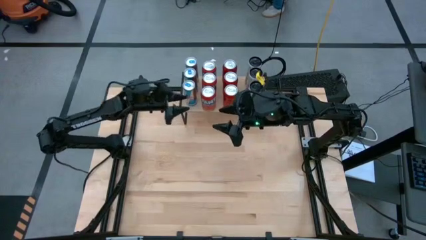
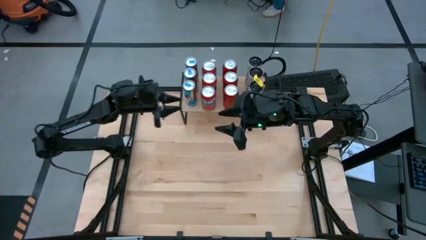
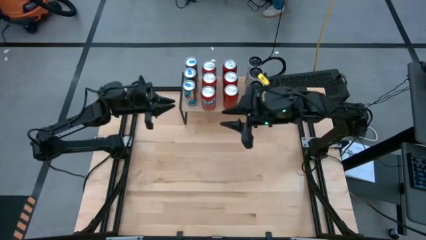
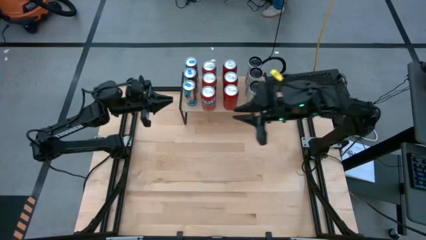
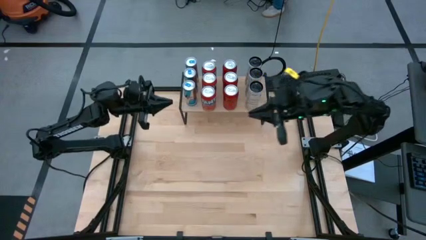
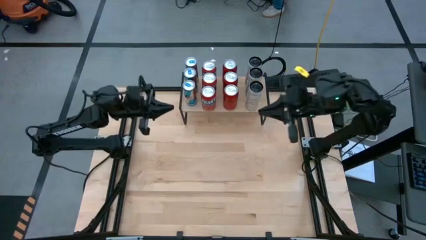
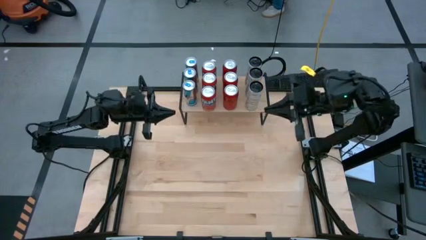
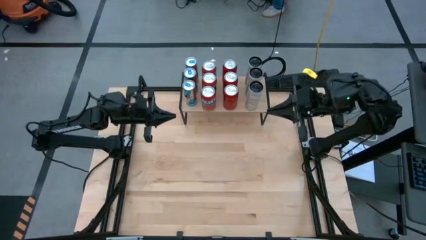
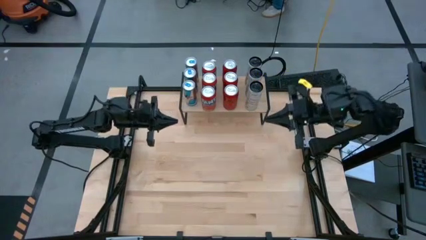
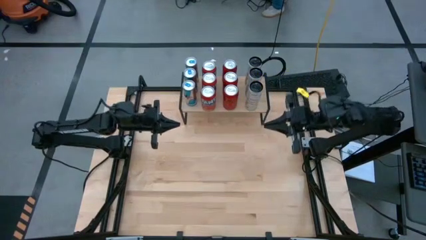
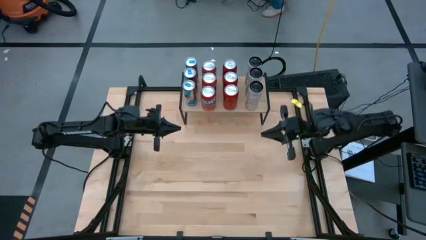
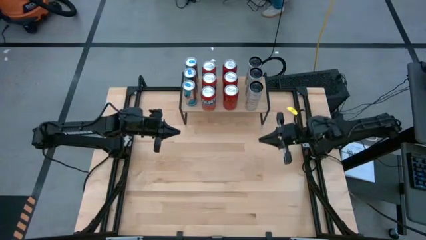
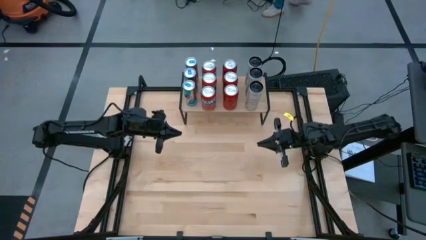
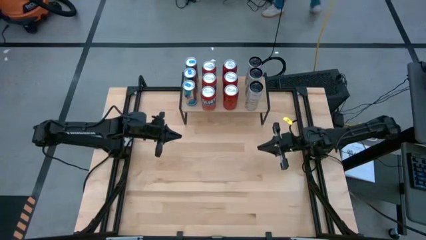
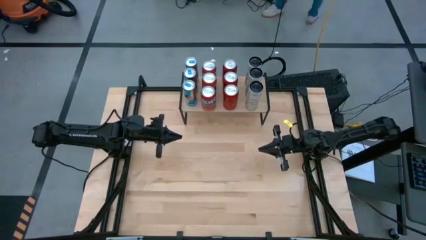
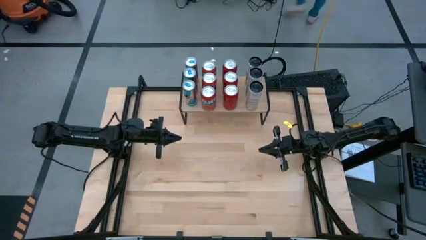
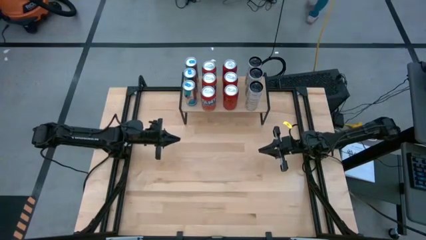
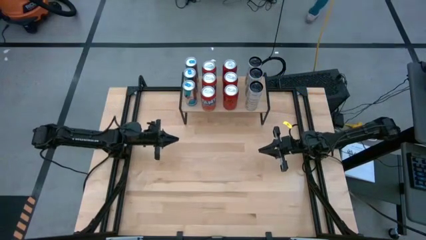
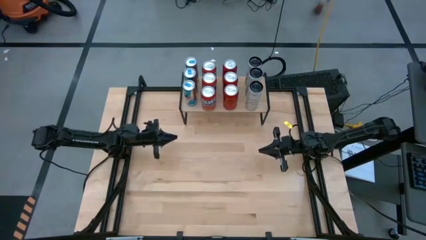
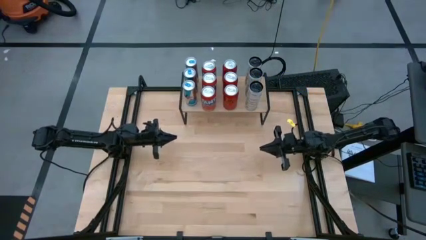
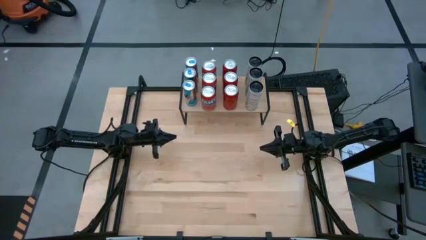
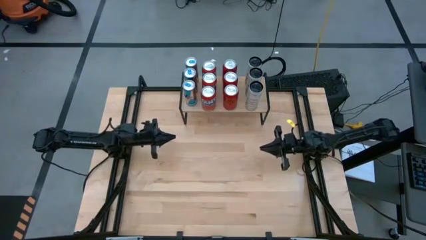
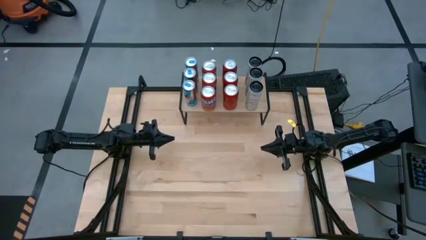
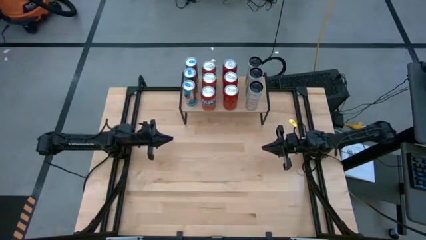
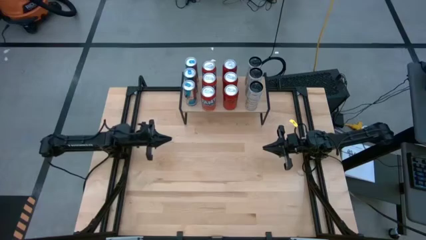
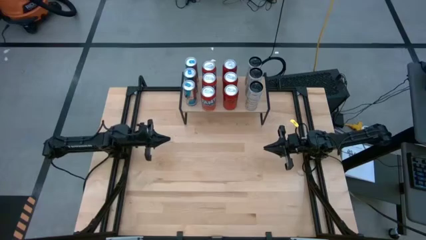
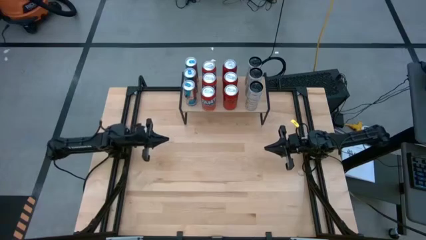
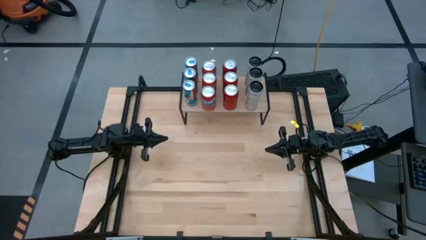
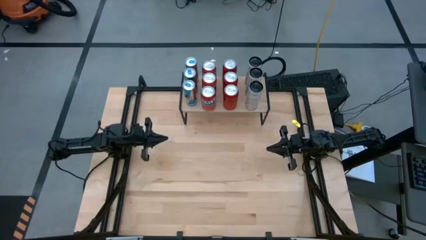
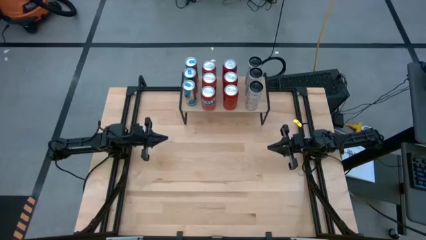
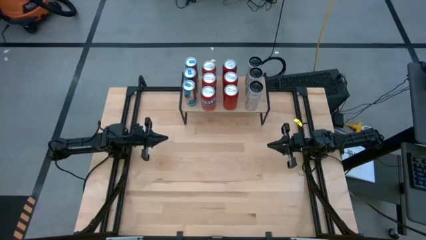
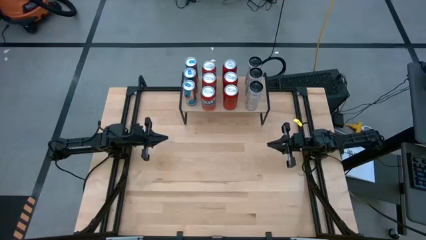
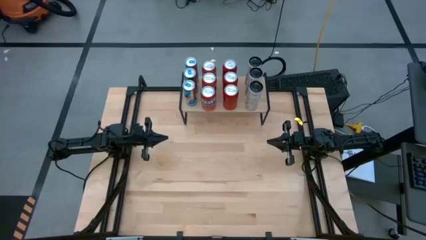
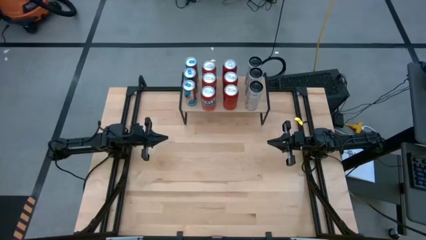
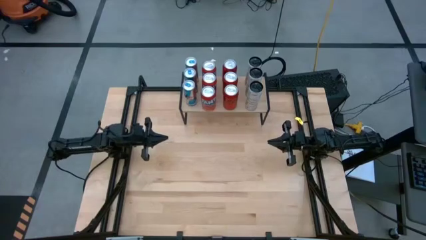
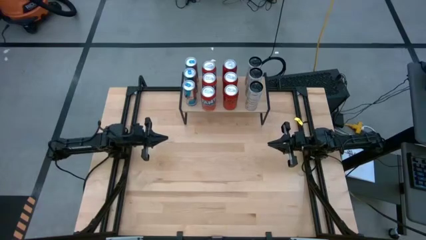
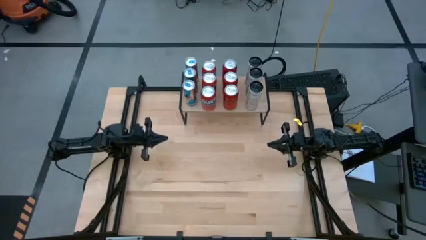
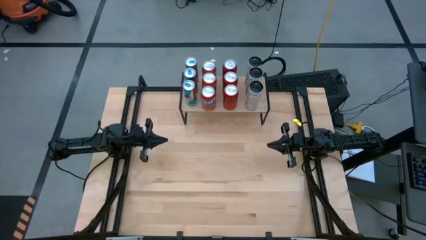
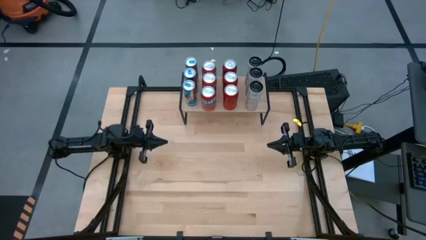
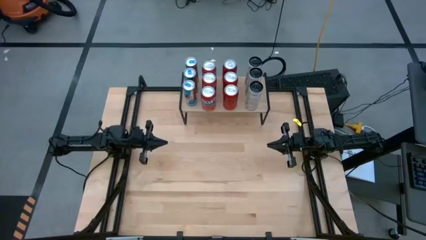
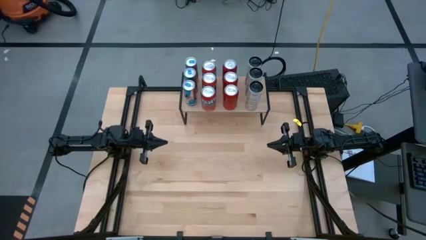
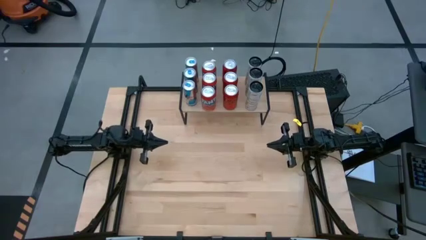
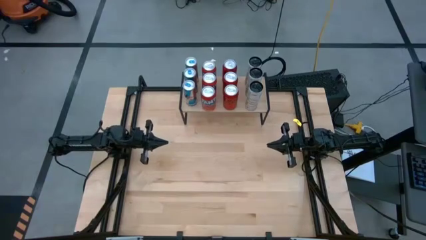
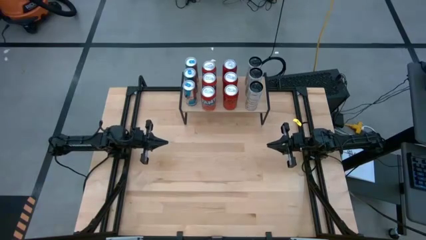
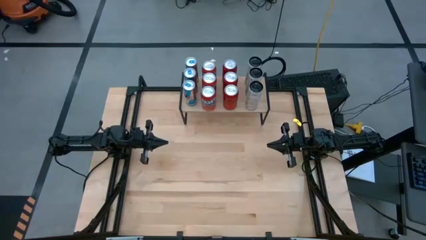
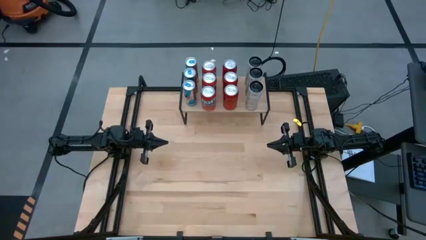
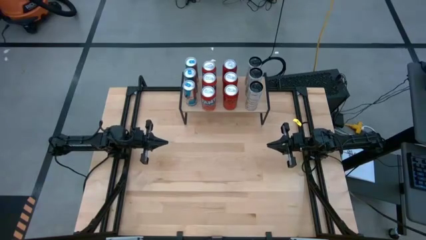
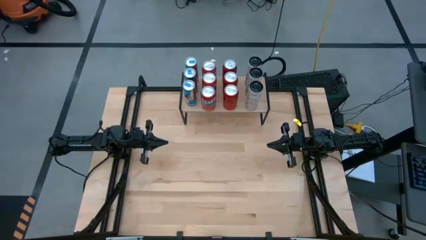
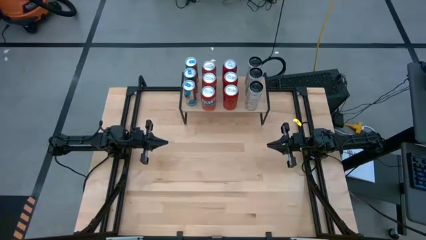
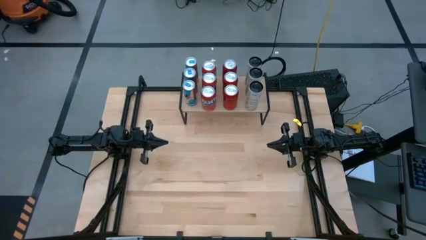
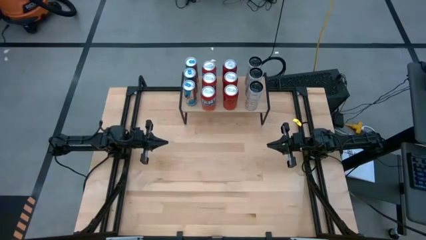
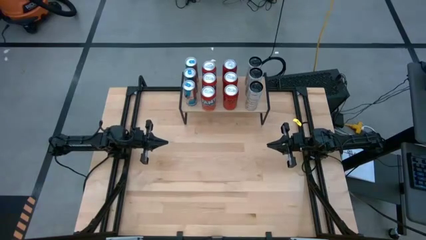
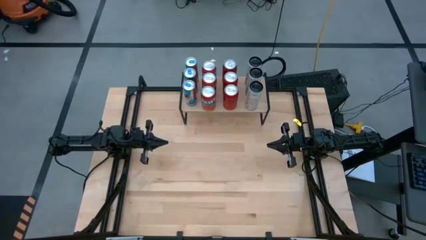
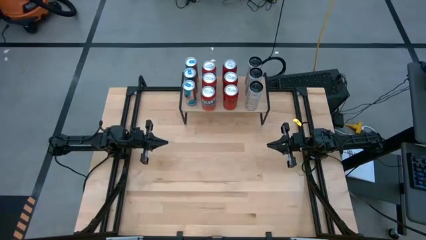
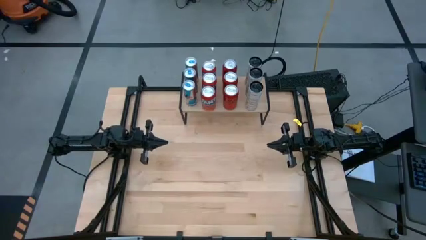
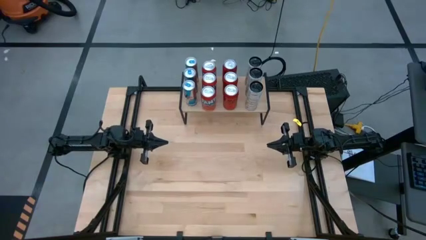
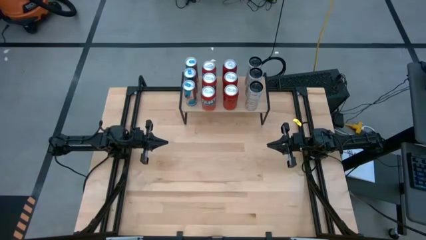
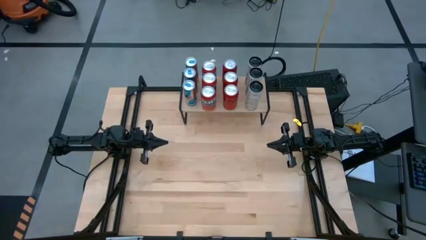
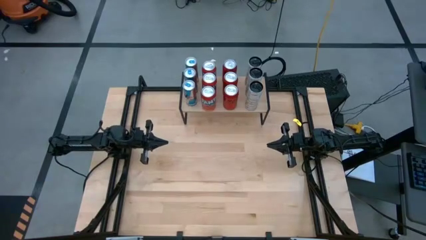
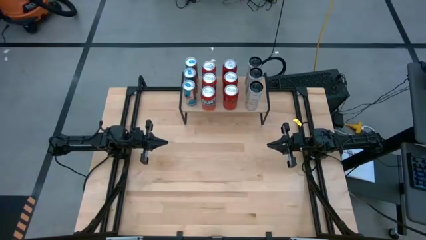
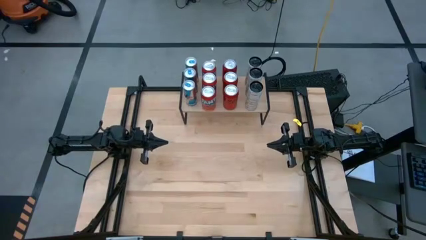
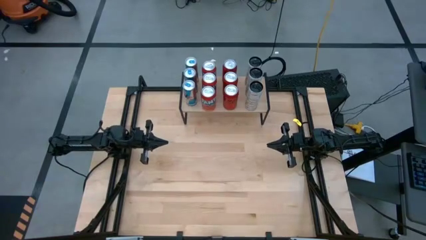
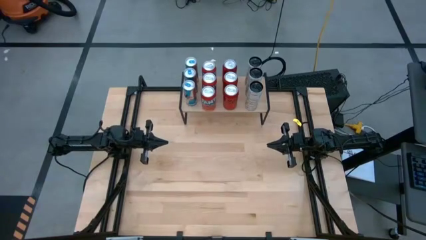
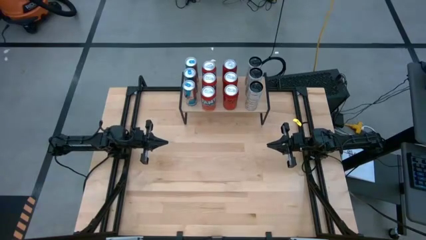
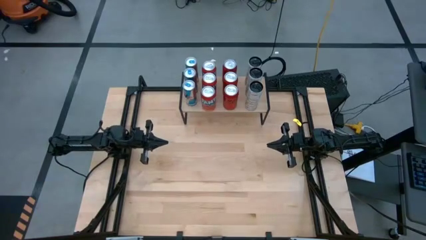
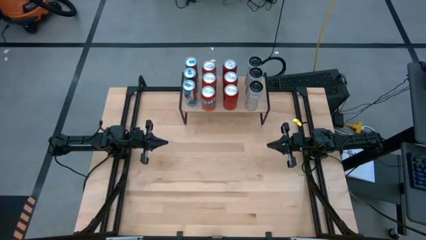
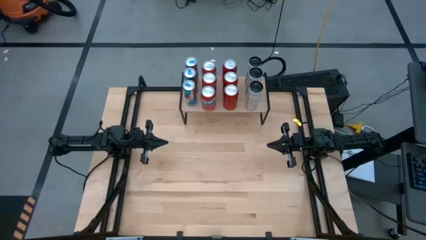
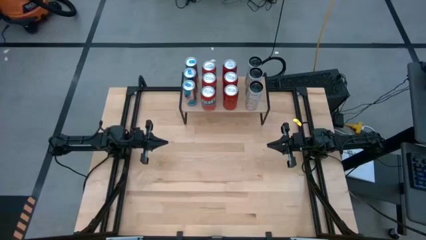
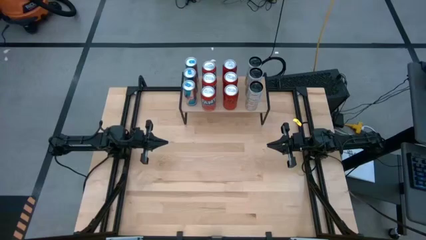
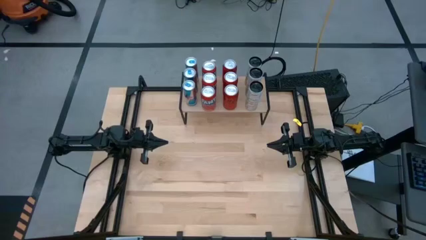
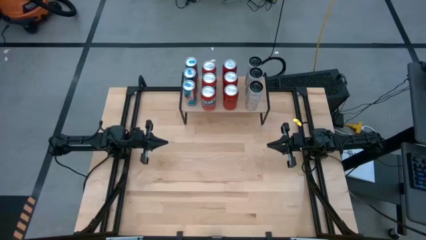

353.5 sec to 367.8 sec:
Task: Place canned beverage on shelf
Return to Home Position

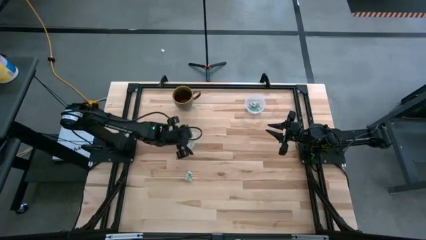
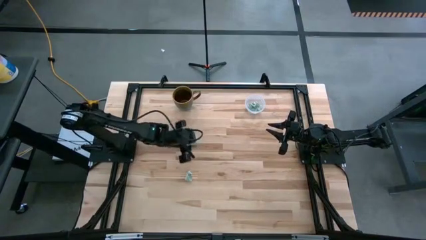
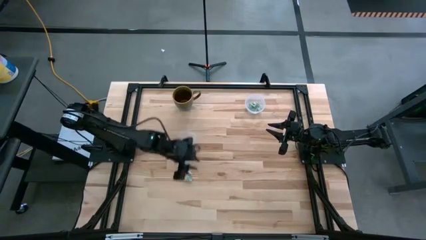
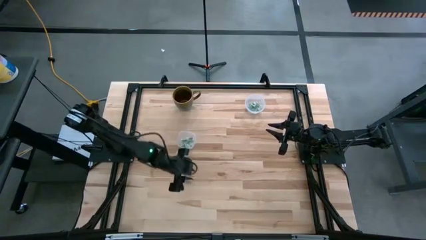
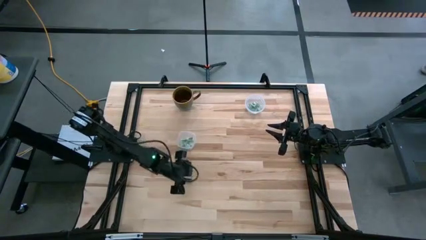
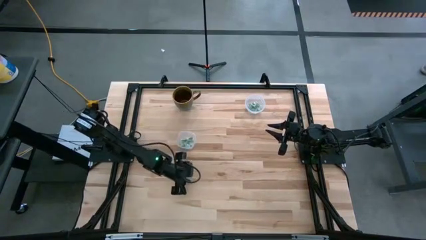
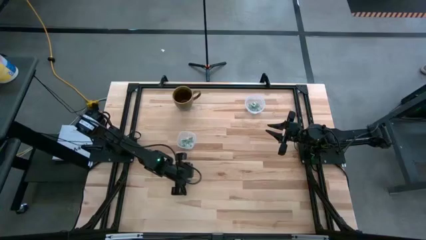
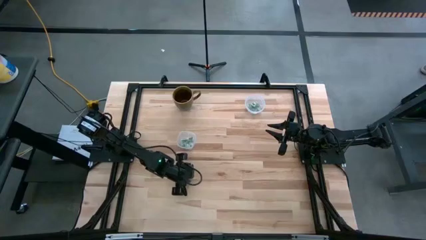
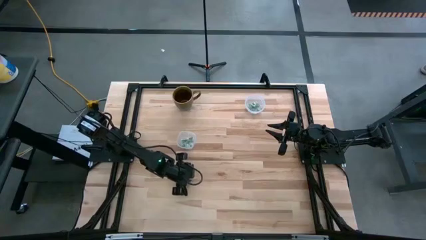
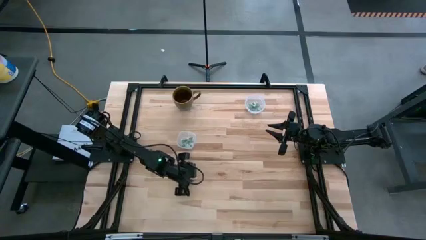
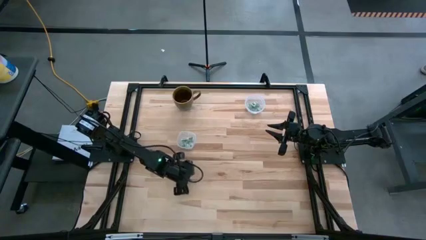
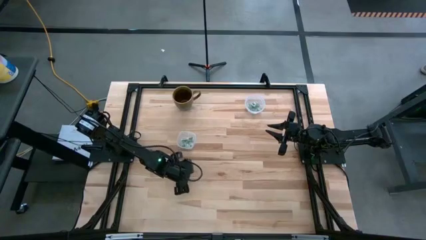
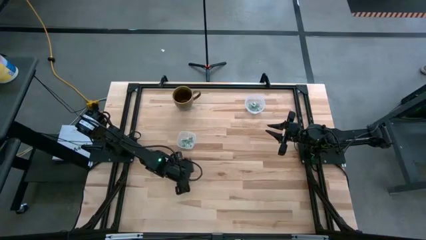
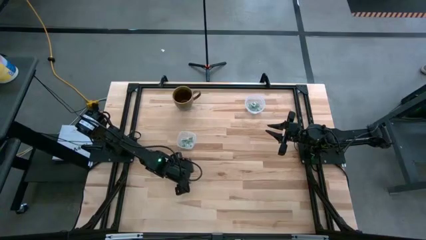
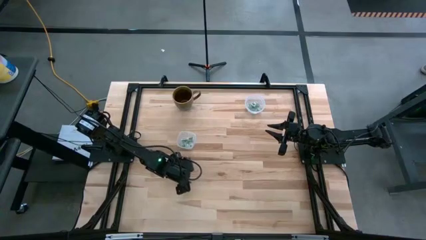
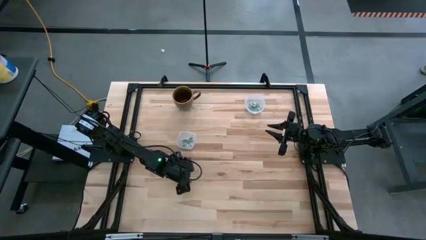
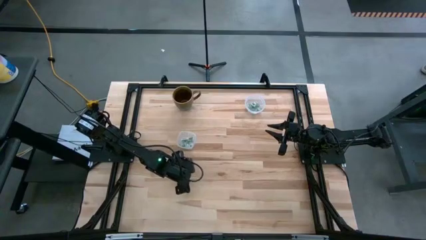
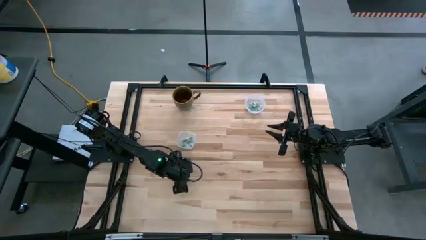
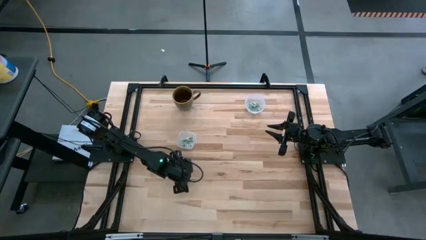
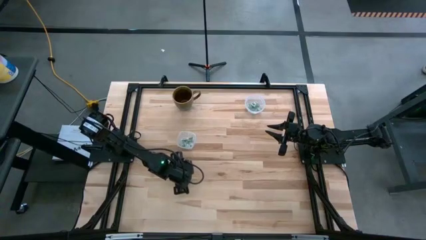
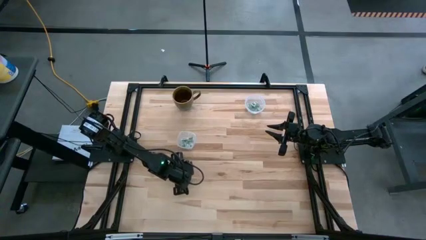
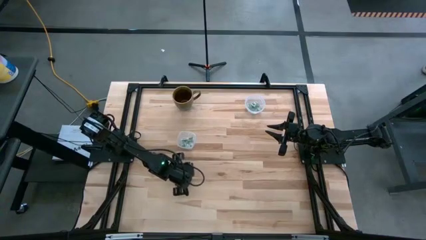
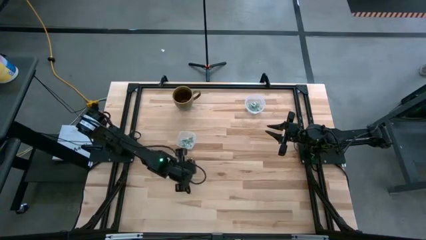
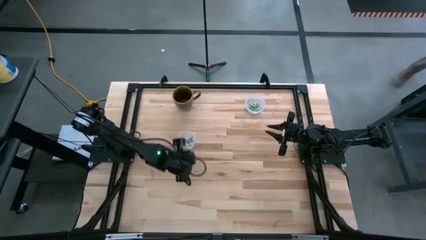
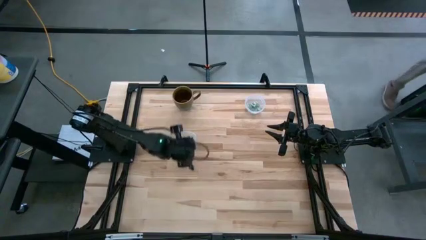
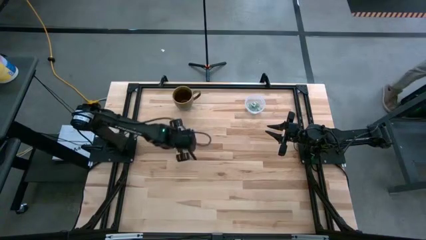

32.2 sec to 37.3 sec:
Task: Pick and place Stevia / Truvia into bins
Put the stevia packet into the bottom container
